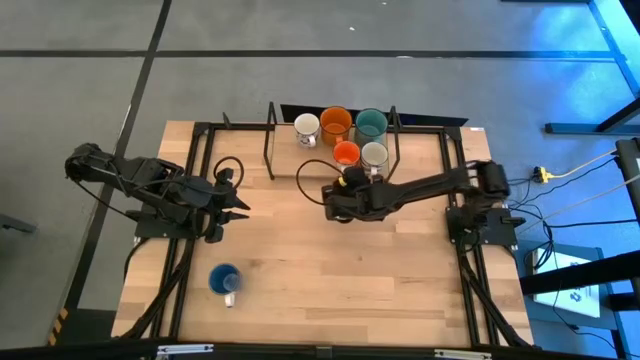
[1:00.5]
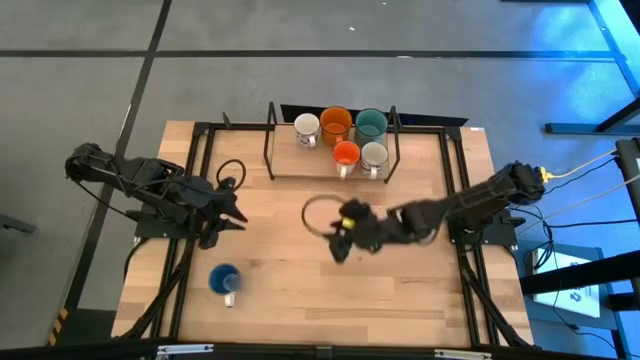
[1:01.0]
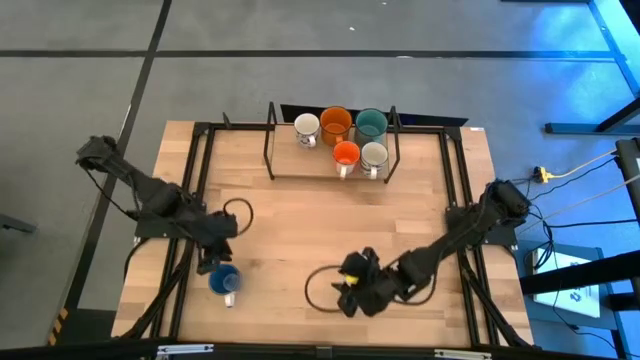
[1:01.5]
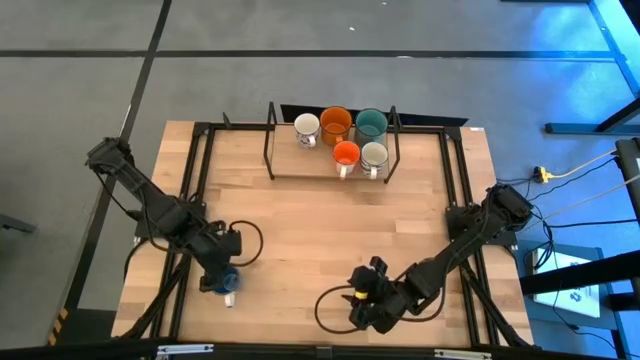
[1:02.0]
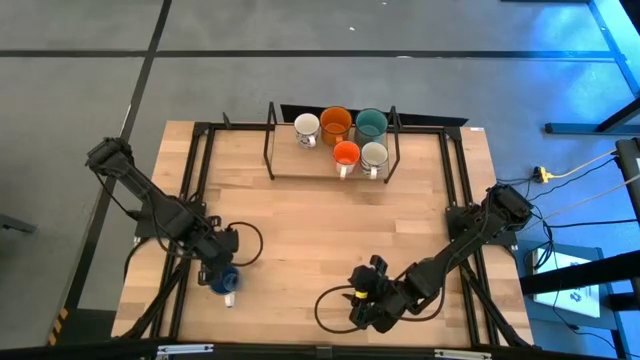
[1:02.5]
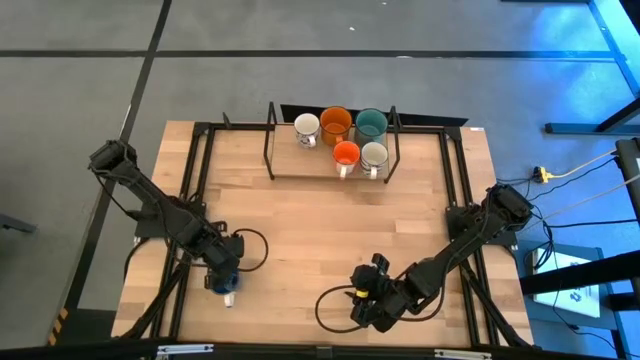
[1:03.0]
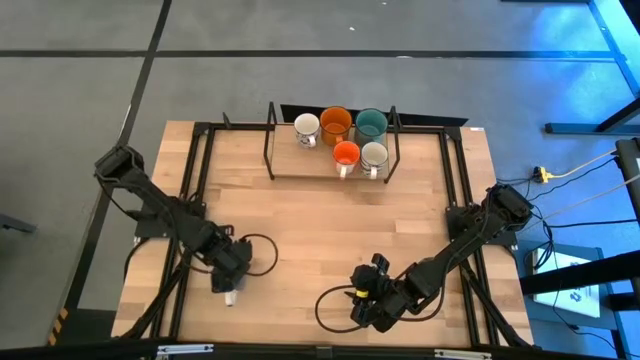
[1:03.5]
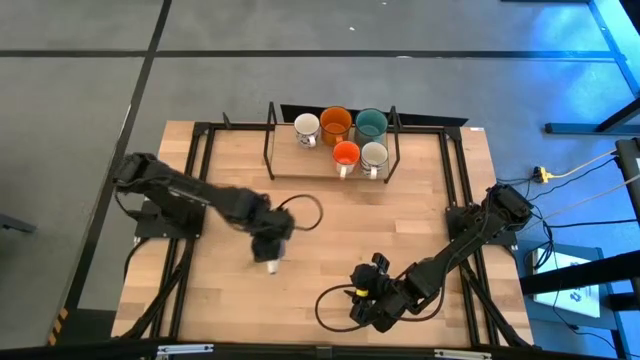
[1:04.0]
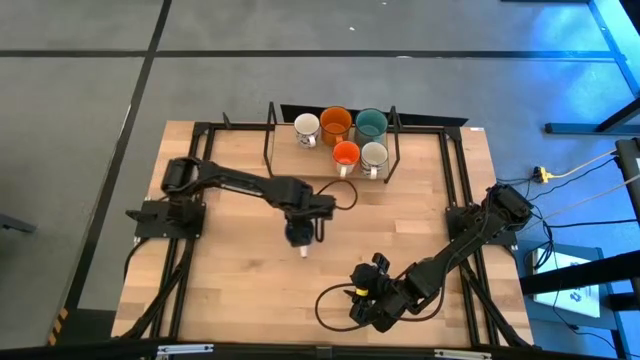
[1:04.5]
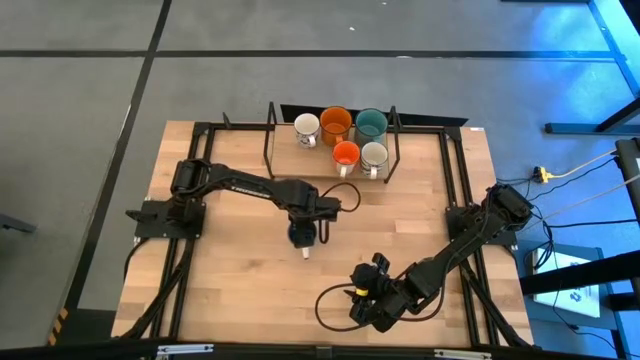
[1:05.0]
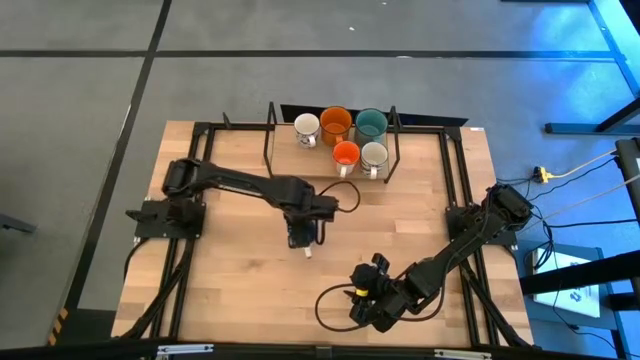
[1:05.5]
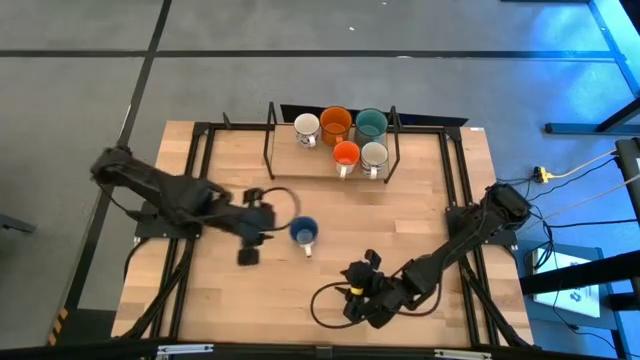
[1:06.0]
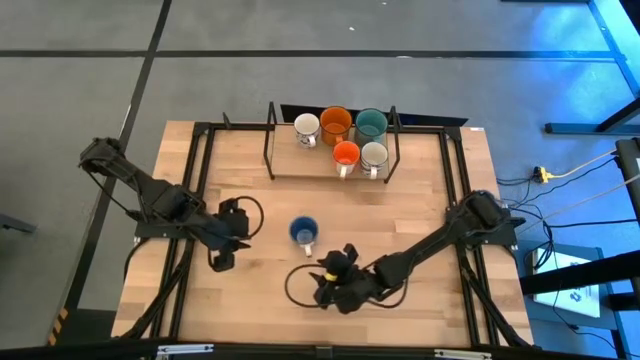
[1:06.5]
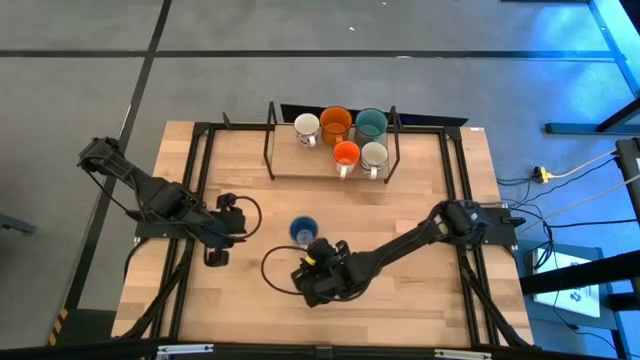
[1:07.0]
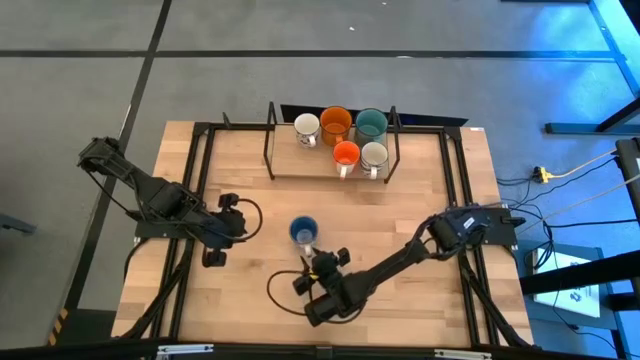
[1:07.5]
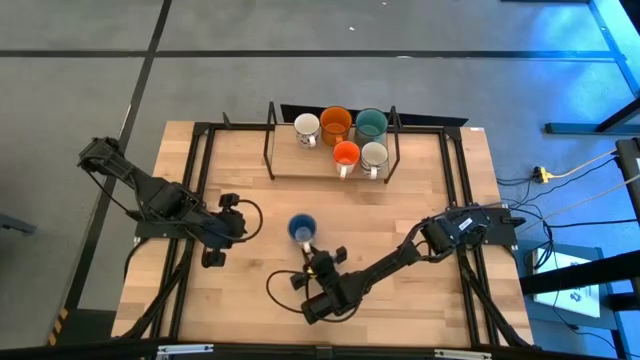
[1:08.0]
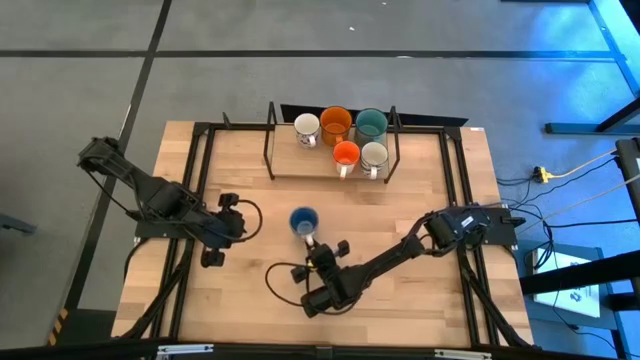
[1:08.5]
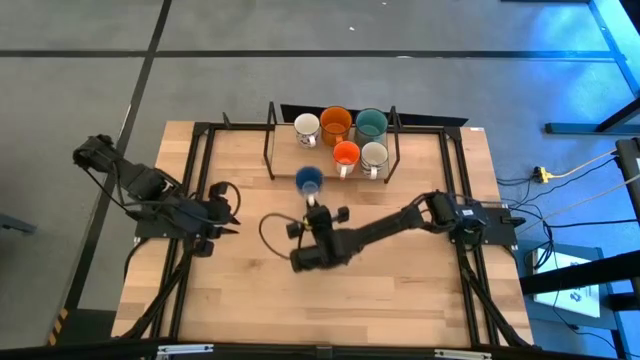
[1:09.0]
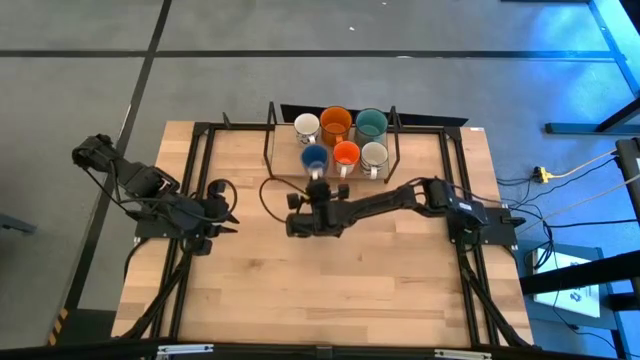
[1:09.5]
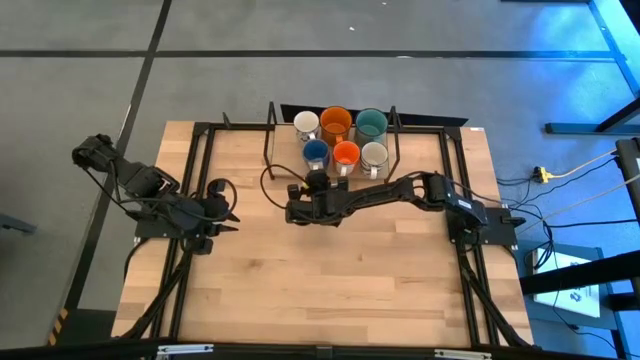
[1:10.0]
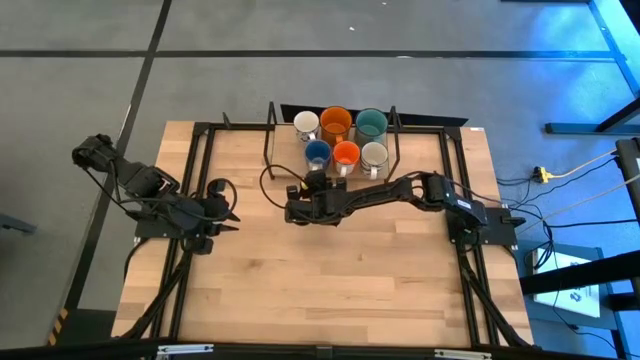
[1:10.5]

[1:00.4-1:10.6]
Task: Place coffee mugs
Put the blue-white mug on the shelf

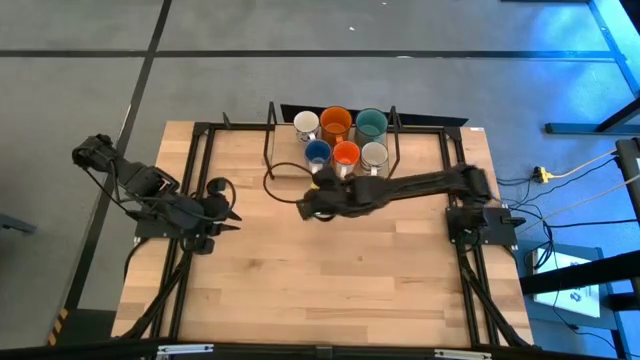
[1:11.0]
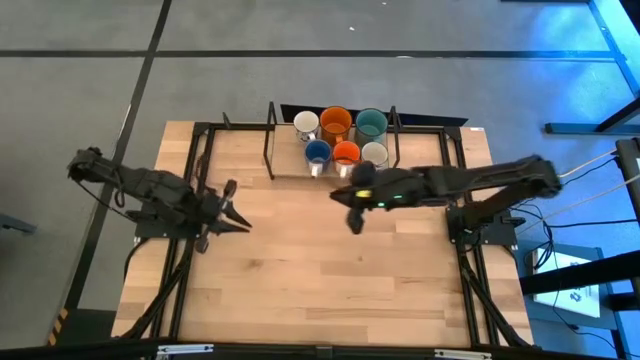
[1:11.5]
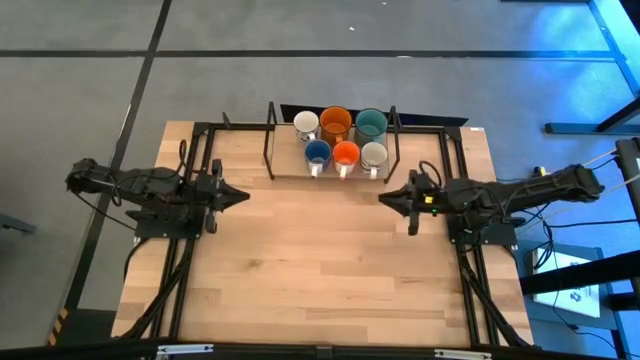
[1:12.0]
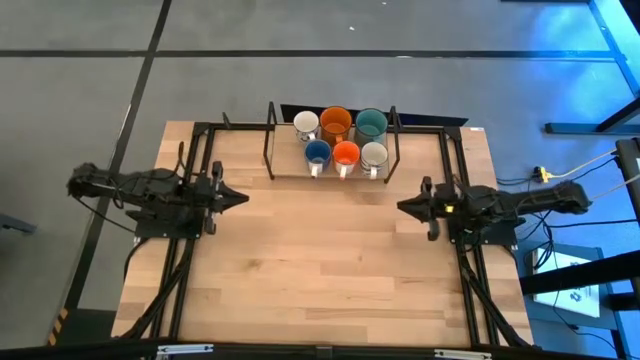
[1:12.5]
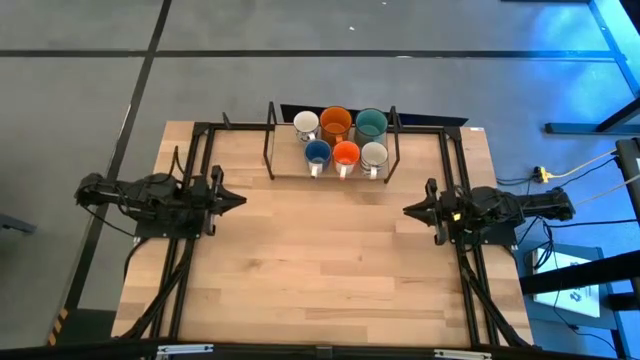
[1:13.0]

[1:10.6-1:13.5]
Return to Home Position
